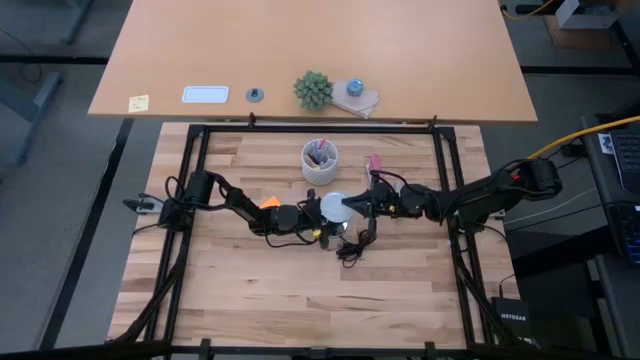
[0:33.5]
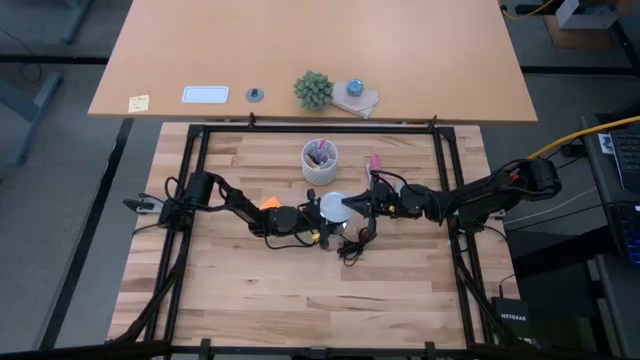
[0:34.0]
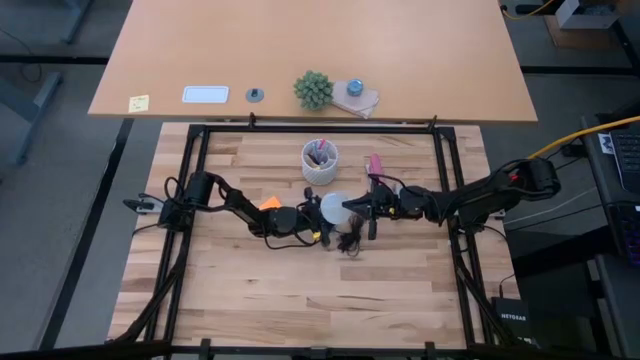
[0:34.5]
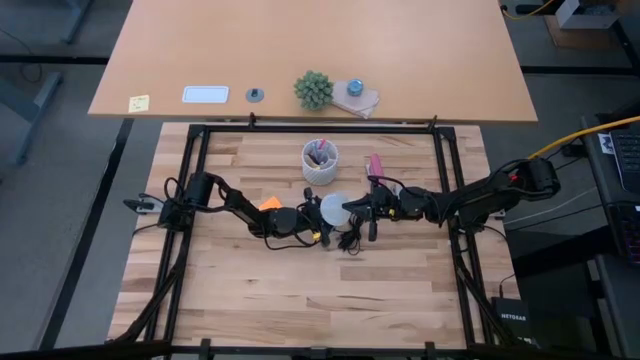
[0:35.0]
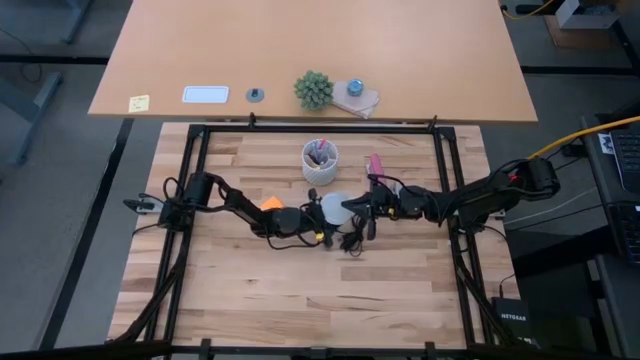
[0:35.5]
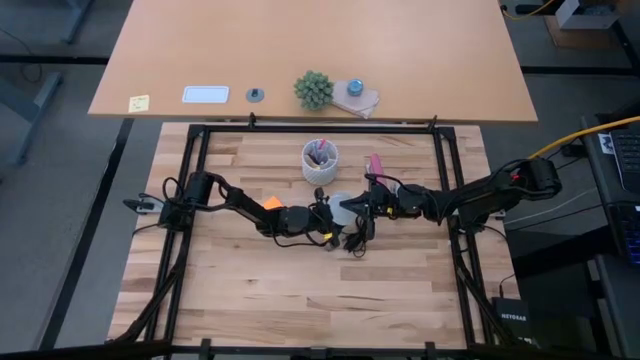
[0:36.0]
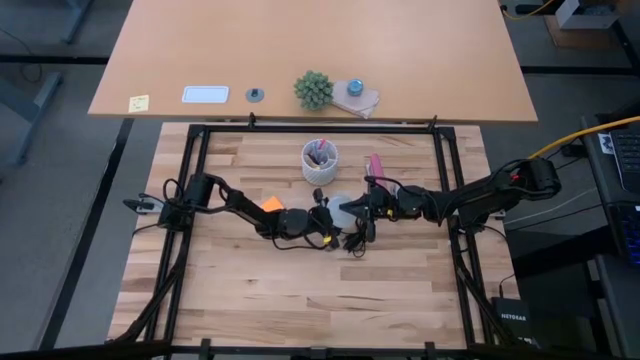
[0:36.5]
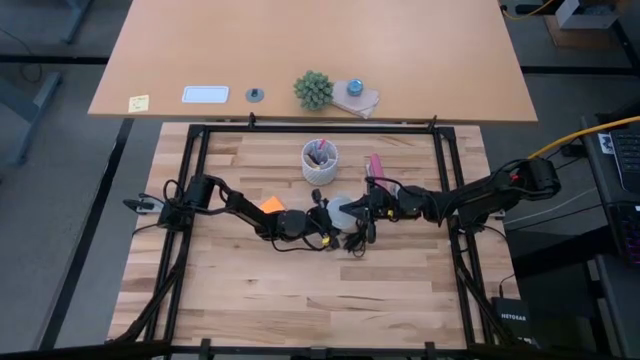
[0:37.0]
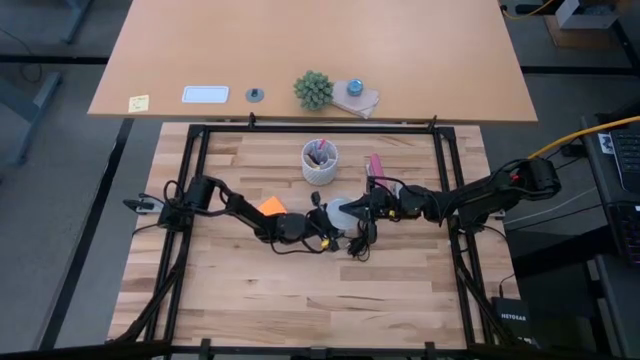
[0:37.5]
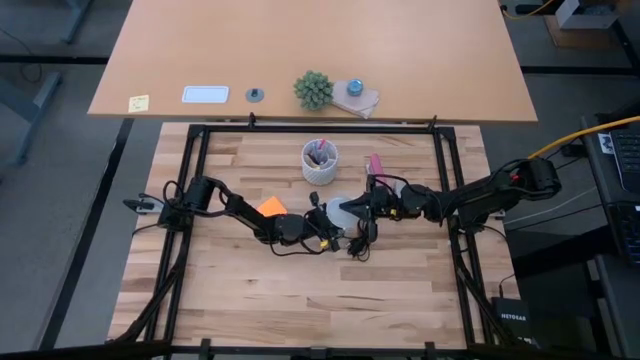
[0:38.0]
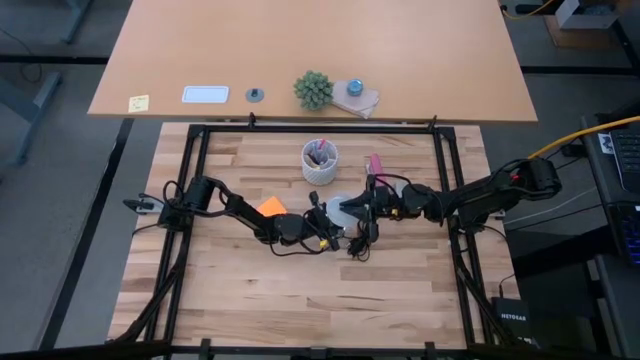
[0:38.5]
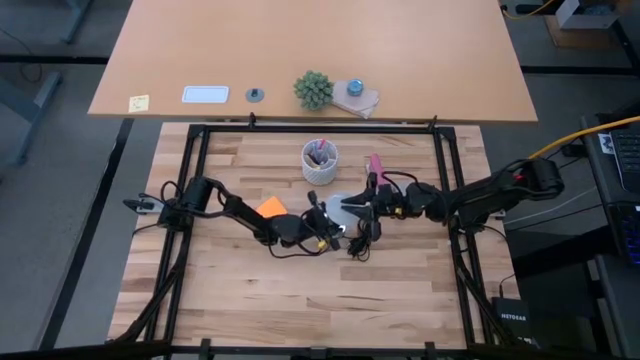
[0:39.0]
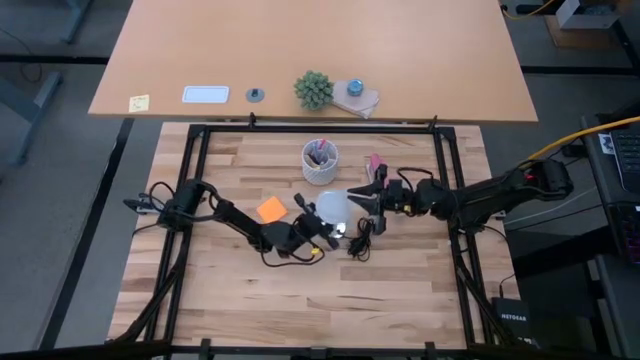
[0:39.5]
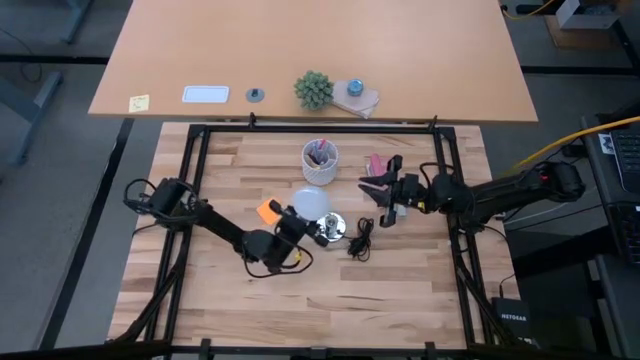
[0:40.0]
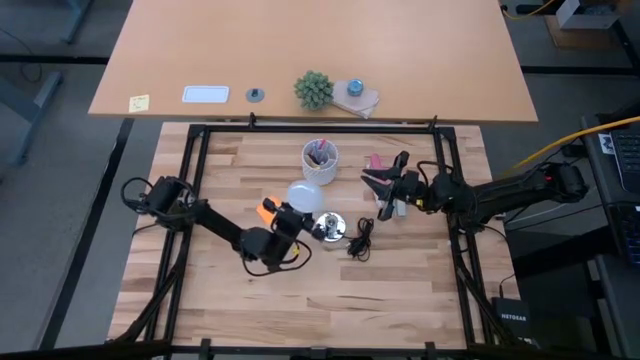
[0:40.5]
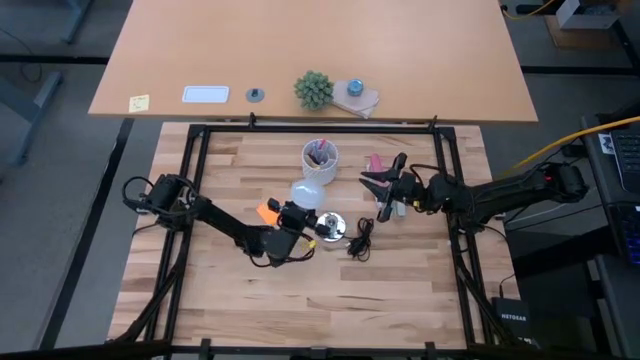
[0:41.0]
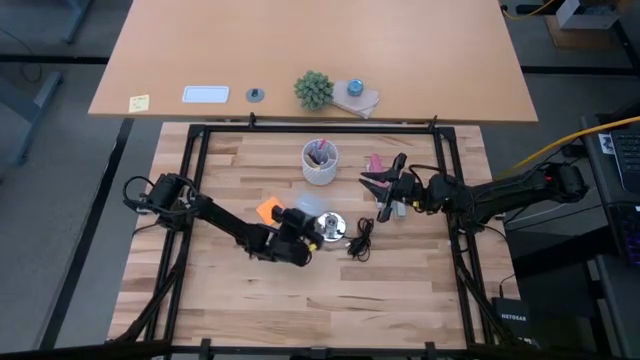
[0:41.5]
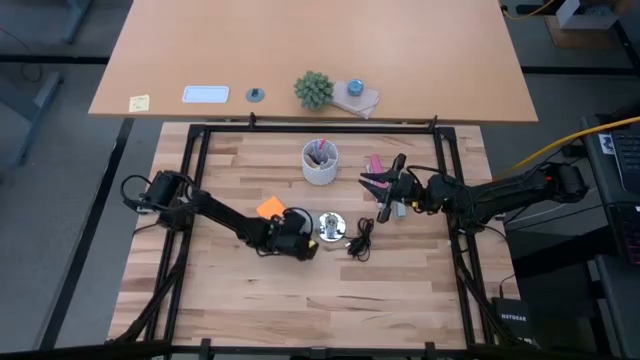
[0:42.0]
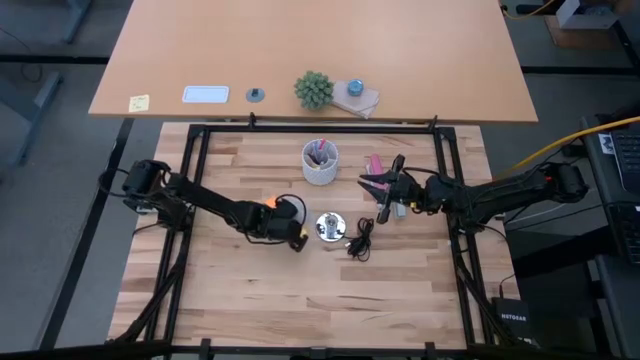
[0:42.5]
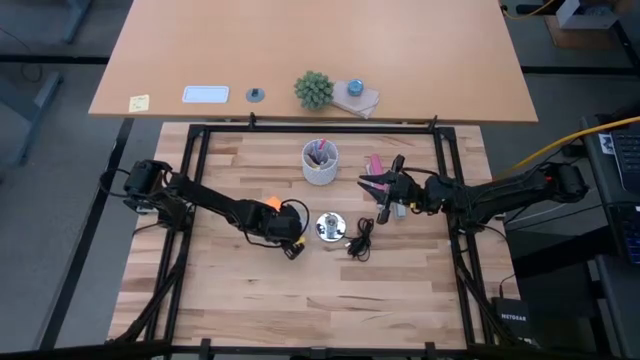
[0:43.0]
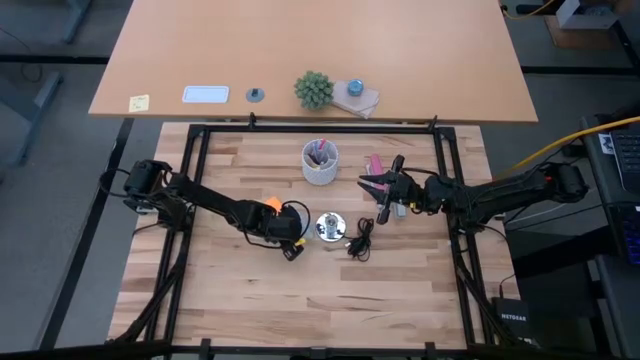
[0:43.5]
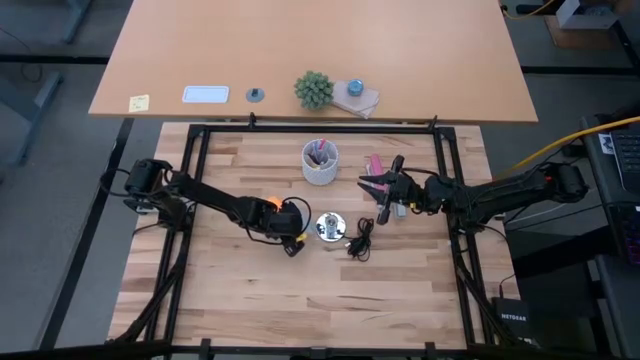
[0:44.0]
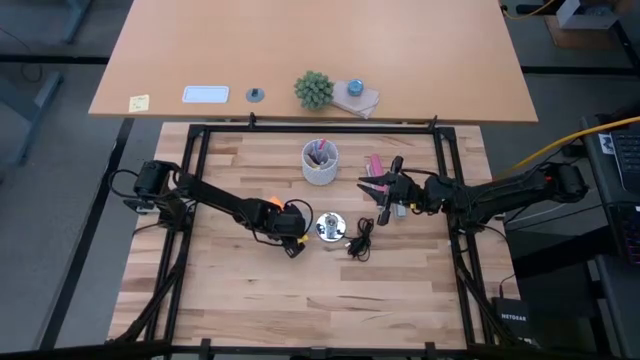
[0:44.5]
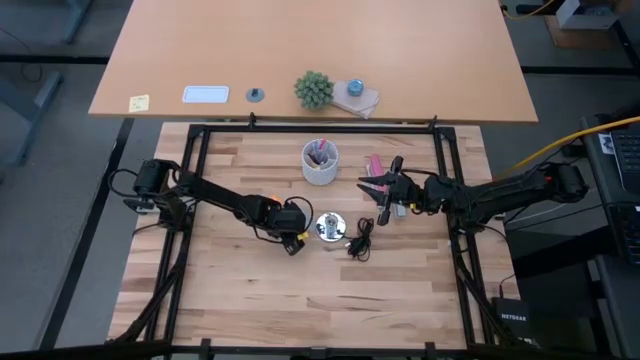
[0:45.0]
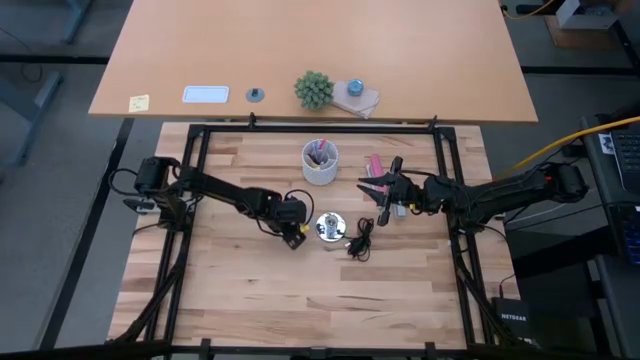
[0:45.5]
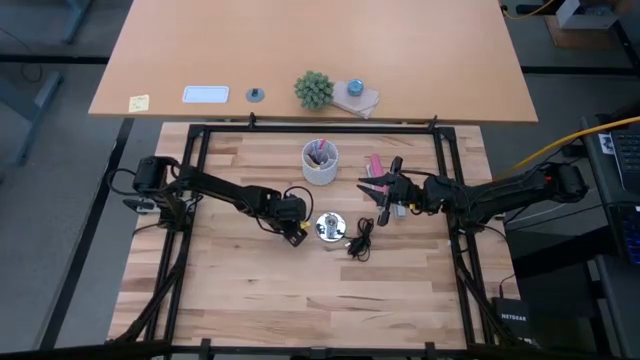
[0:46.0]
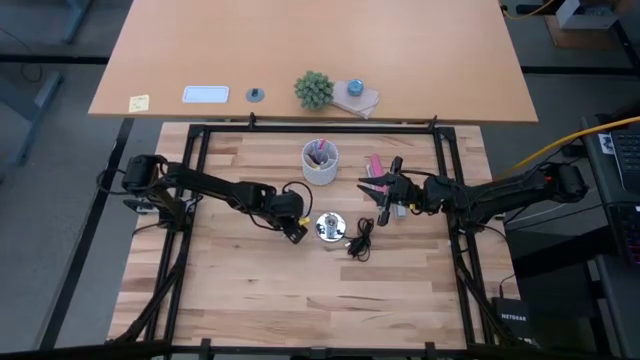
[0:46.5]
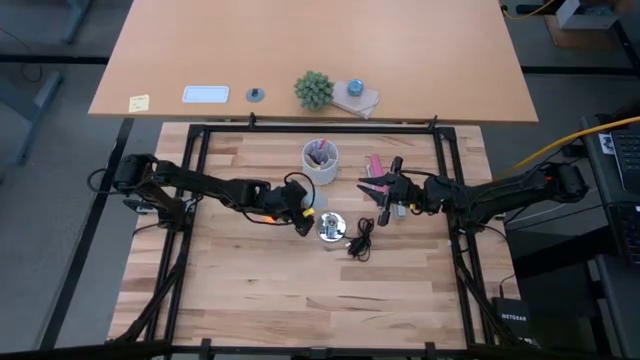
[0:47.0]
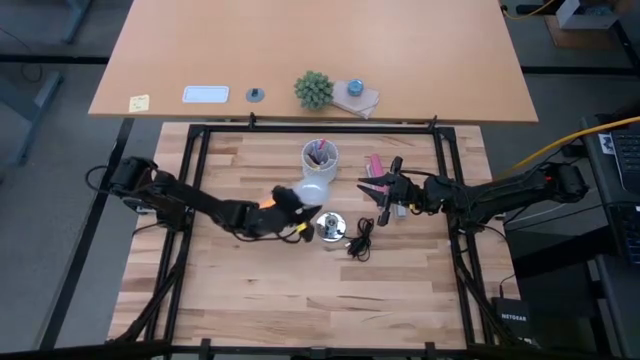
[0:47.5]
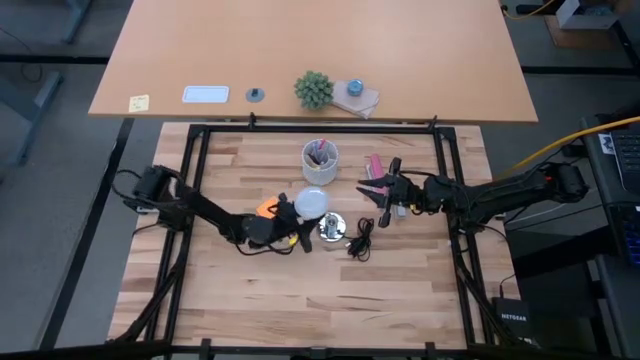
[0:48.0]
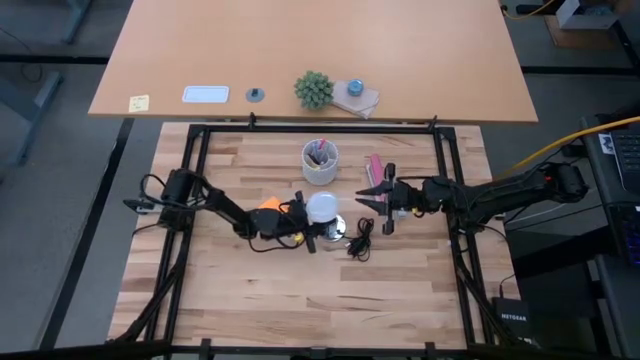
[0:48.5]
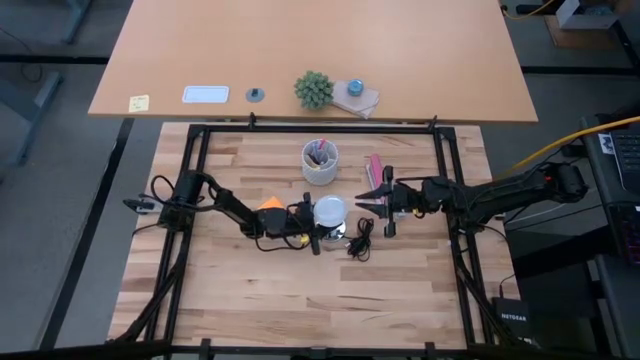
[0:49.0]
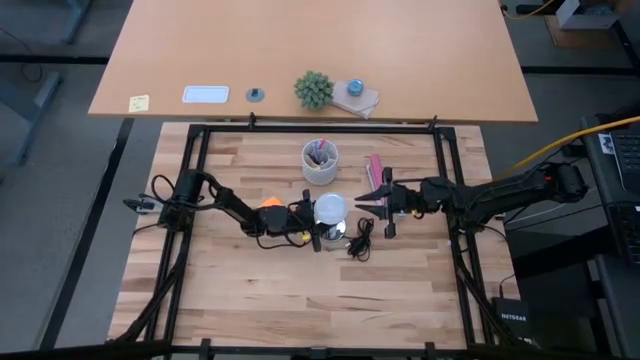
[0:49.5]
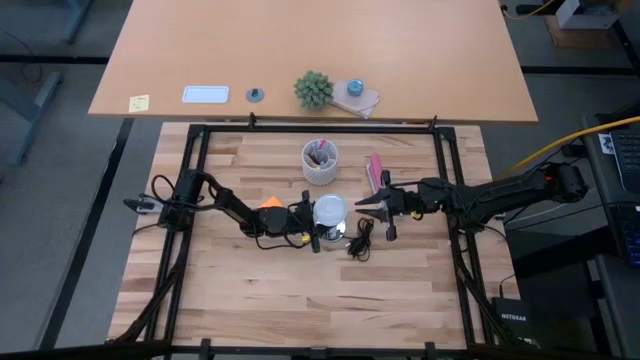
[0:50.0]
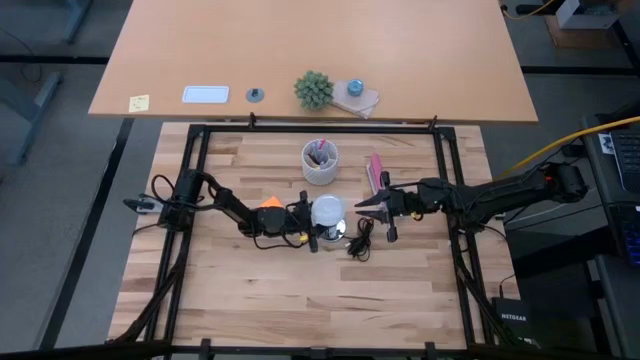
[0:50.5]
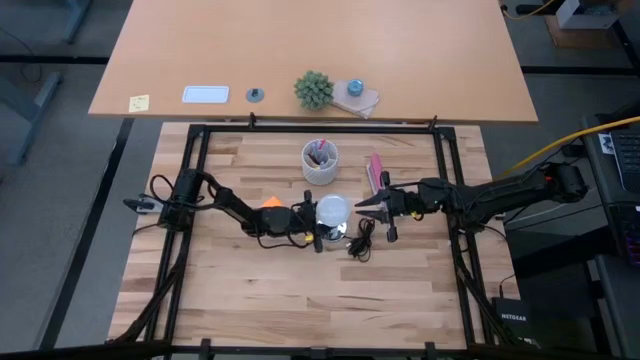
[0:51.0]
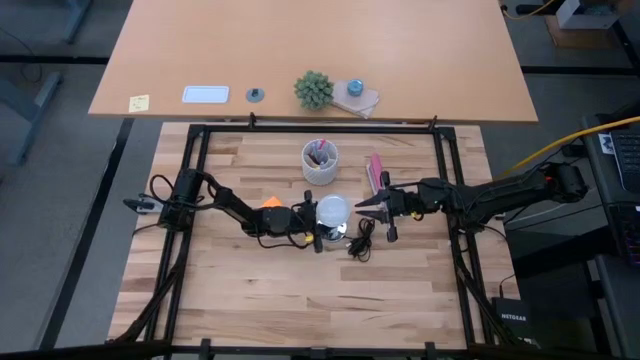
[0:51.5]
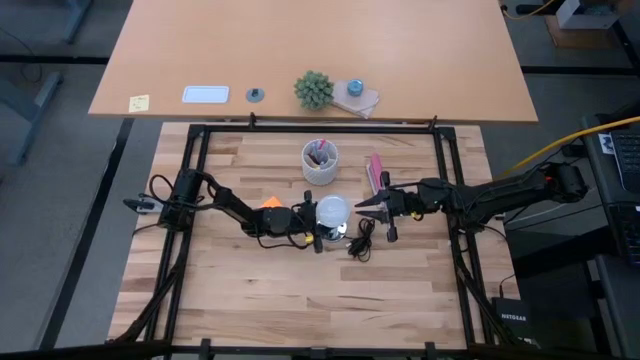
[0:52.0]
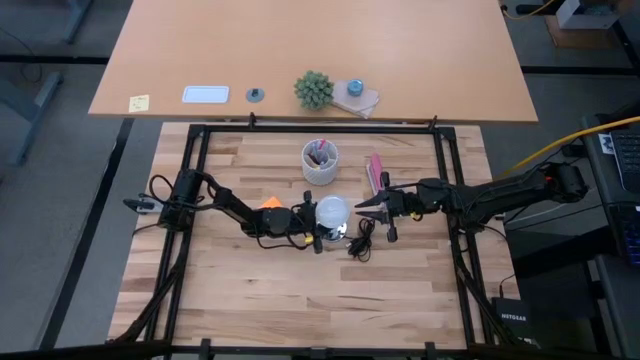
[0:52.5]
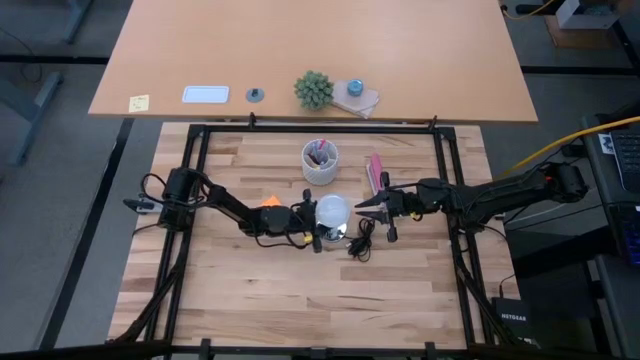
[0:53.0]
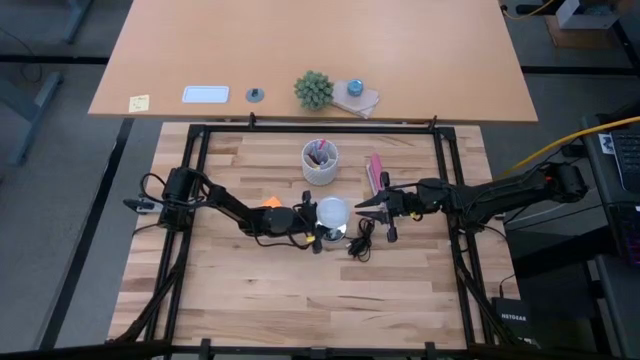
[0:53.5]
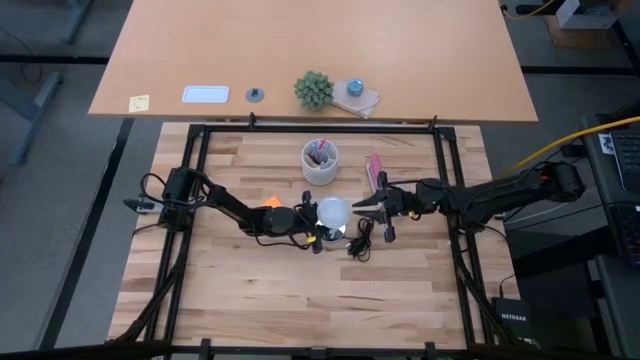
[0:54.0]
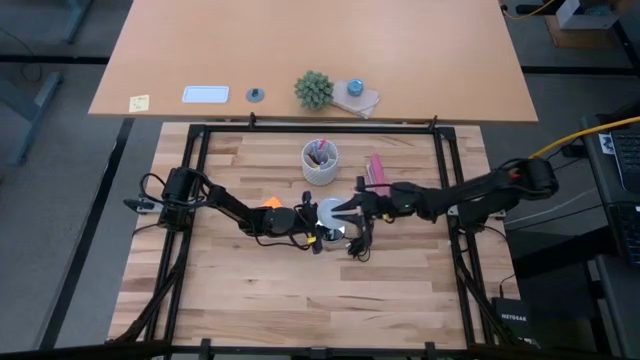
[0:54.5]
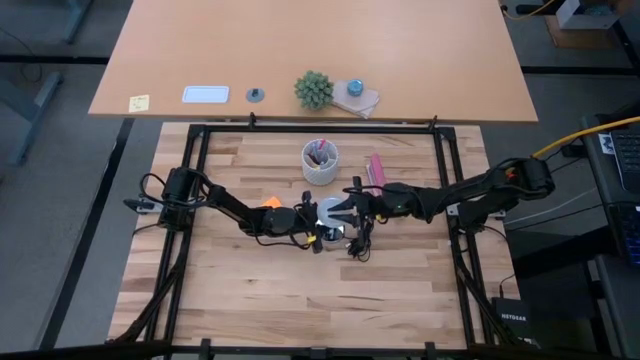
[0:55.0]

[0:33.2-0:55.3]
Task: Screw lightbulb
Insert the lightbulb into the lamp
